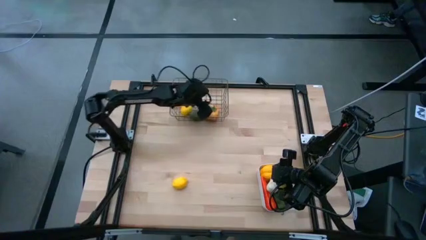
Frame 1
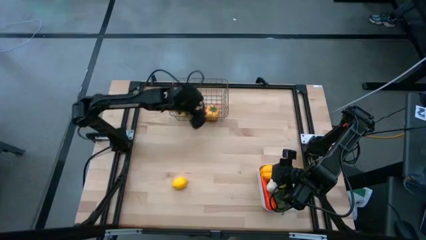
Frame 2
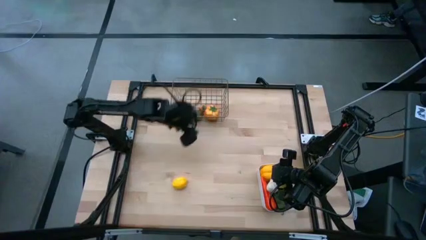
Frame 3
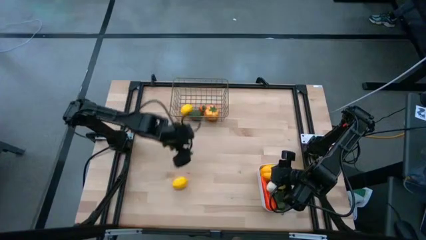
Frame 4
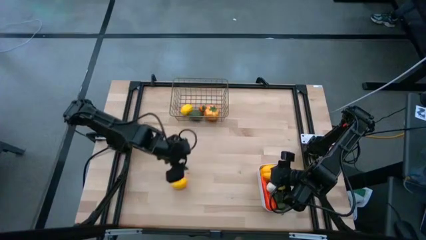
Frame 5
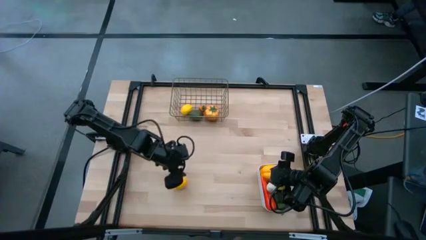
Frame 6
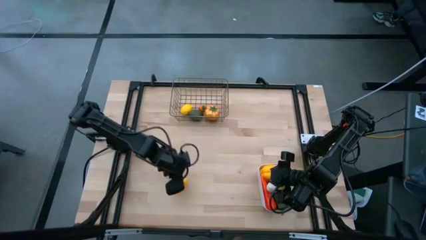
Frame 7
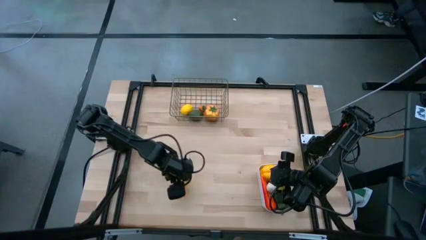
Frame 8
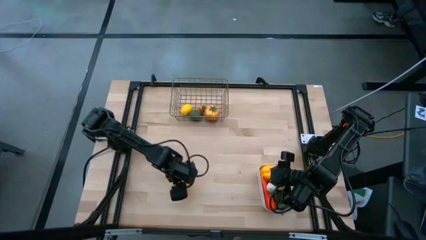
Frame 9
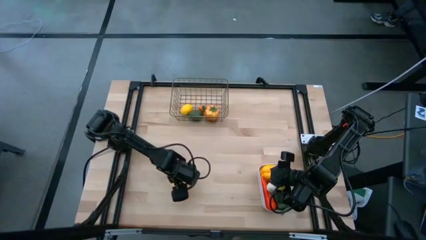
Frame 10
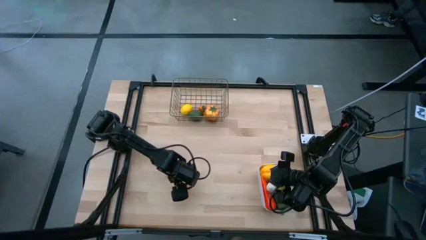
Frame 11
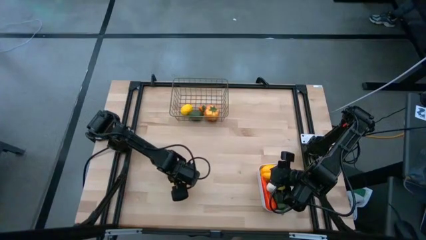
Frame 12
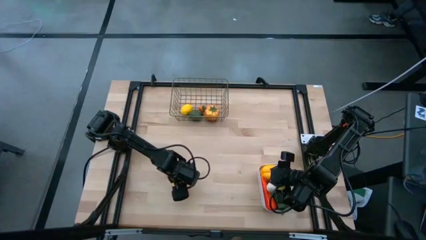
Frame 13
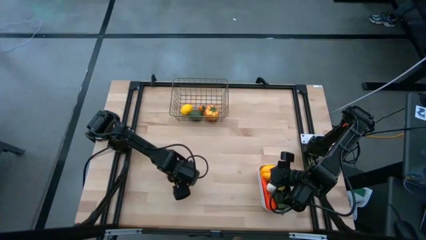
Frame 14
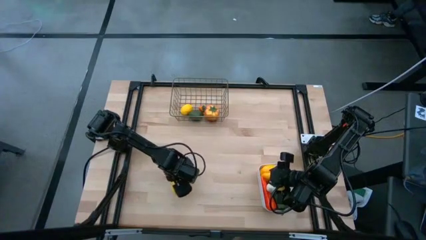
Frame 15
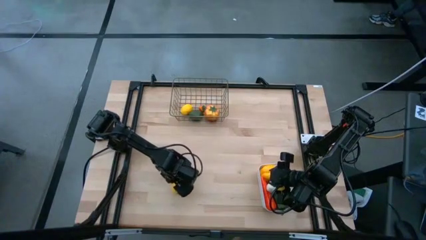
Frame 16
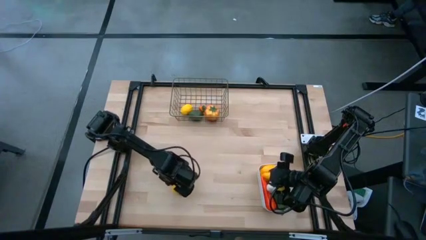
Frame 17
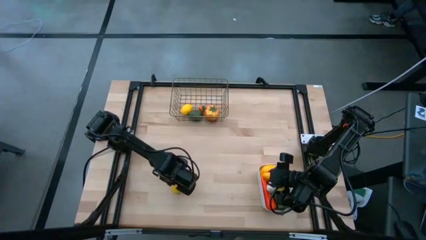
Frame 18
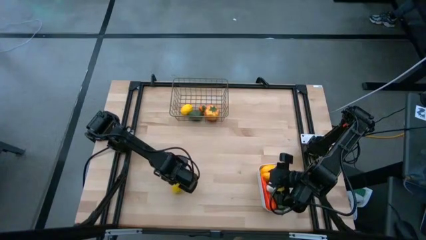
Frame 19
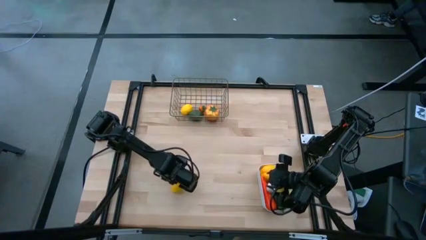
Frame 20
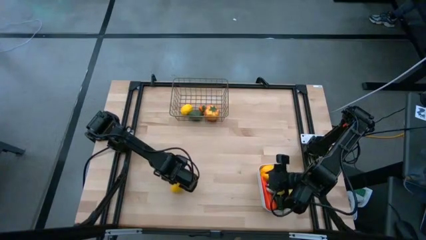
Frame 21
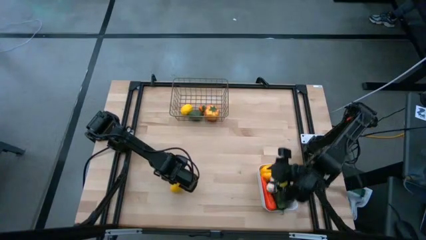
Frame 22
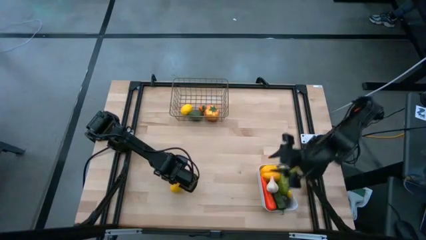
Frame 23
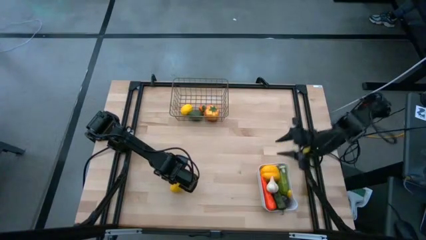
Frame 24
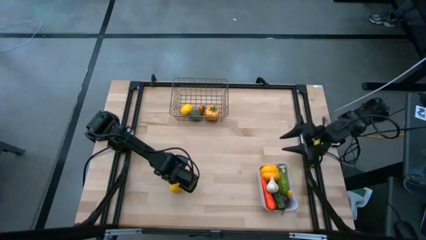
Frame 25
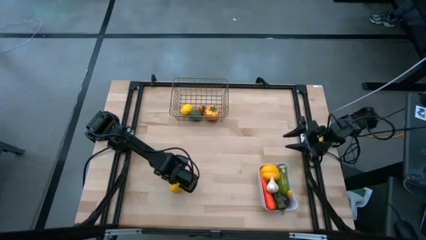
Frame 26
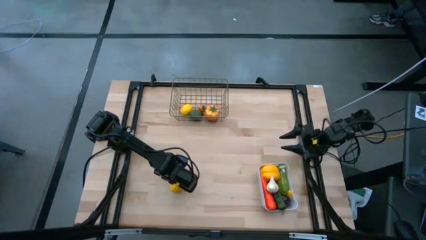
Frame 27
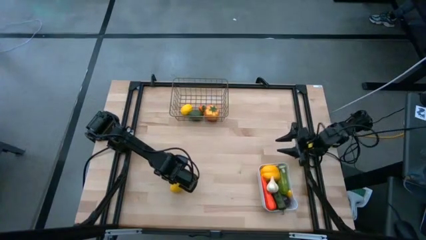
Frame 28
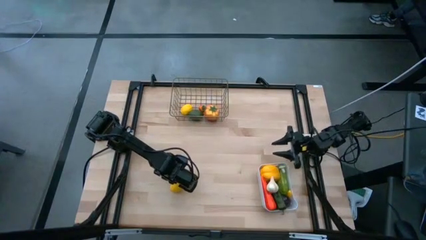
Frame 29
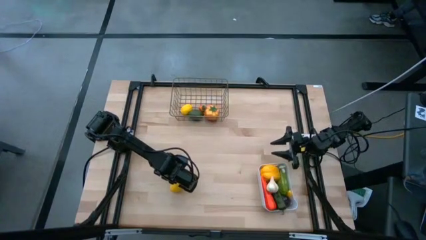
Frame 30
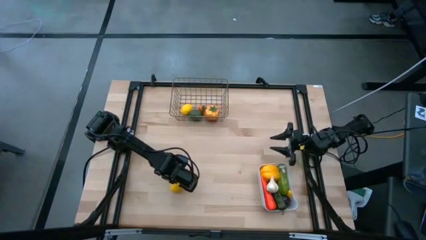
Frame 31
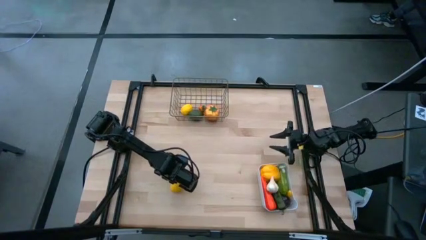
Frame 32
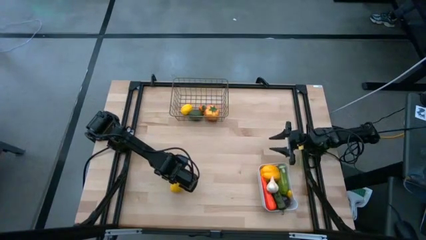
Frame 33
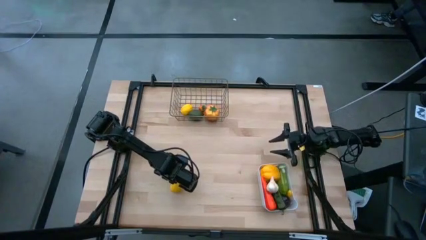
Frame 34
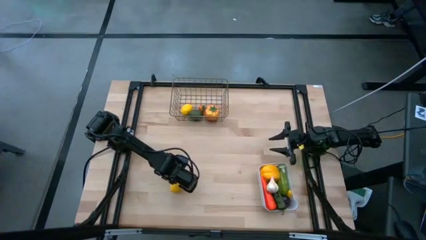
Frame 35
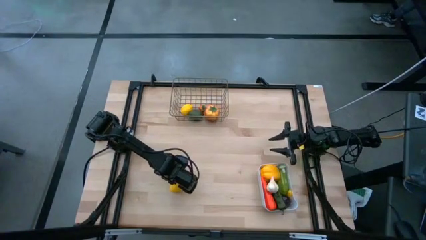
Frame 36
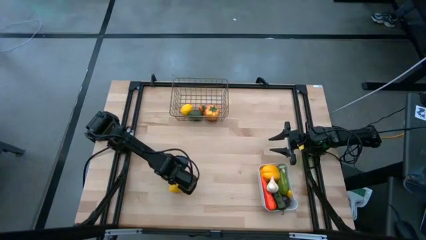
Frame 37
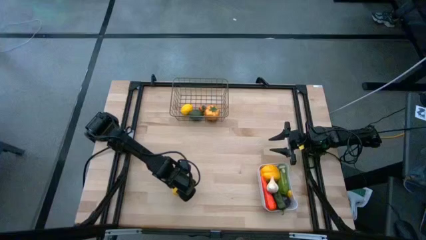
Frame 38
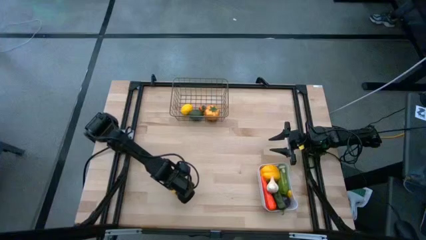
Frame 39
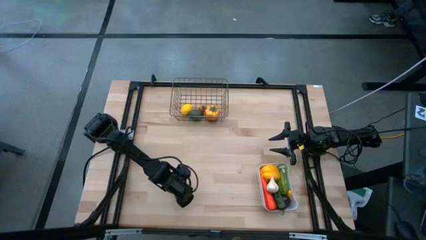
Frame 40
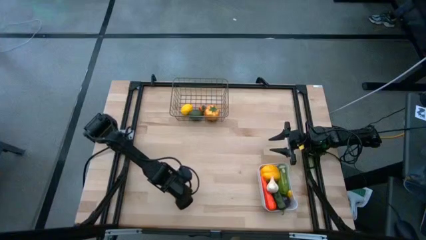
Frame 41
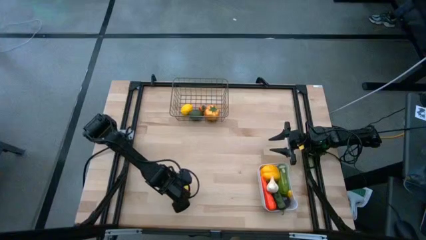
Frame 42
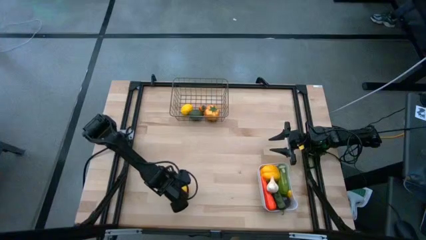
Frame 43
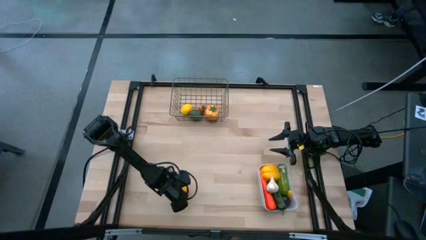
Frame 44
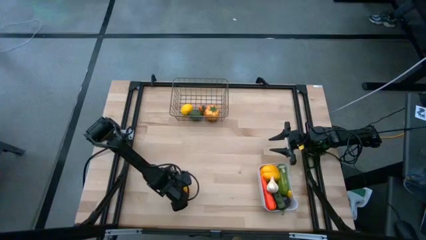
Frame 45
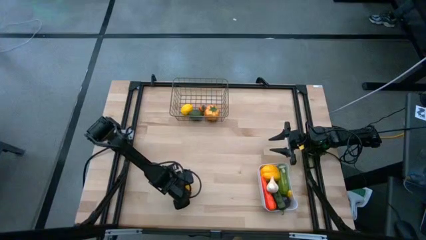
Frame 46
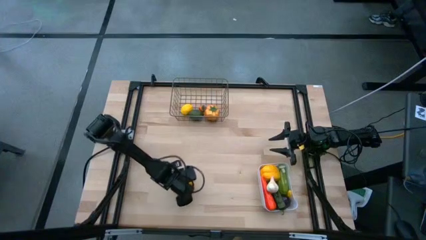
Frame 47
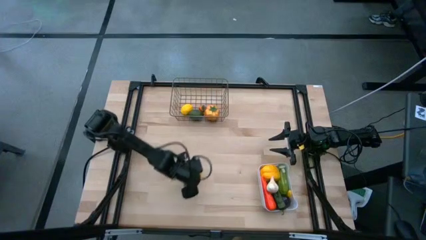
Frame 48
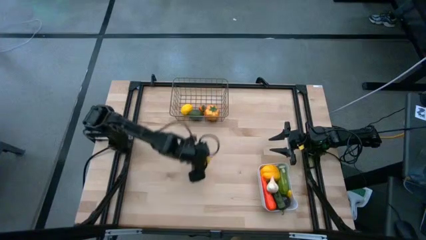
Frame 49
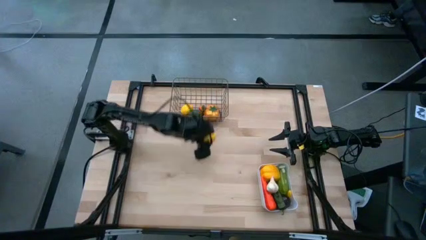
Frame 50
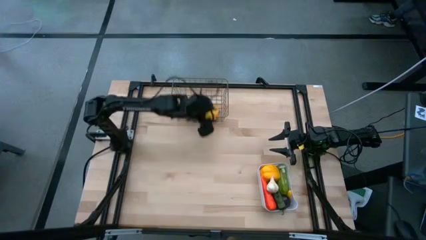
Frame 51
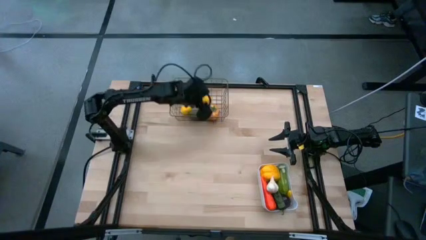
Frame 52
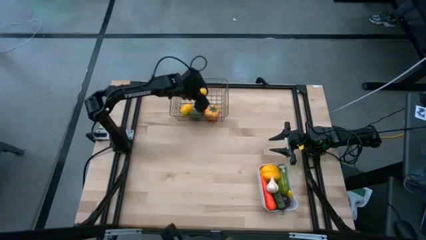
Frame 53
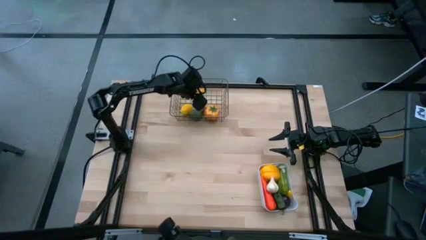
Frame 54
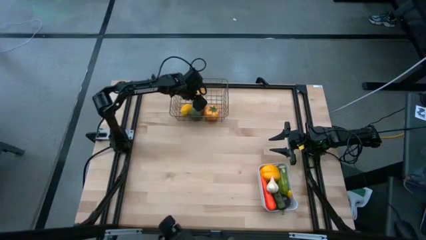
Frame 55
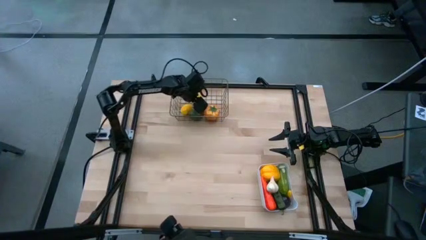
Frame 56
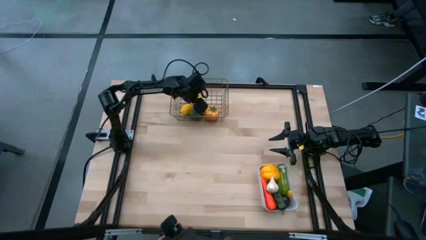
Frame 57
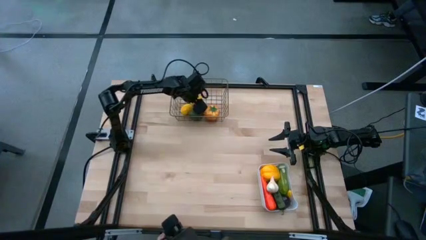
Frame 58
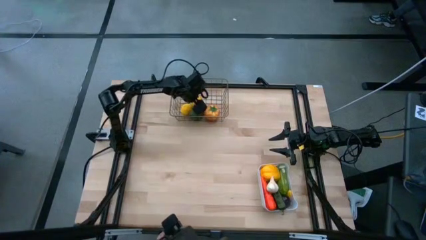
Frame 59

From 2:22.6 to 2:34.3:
Task: Sort produce into baskets
Put the lemon into the mesh basket

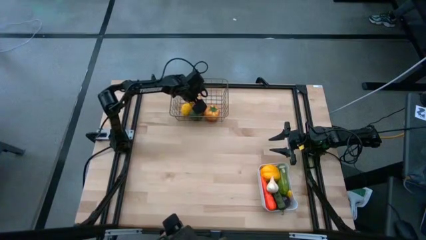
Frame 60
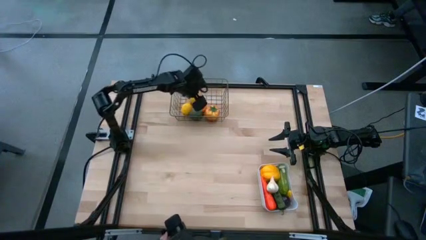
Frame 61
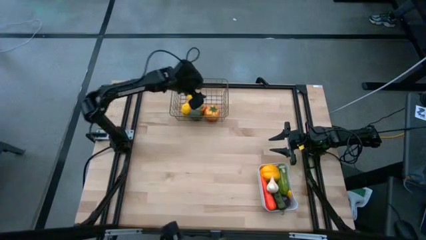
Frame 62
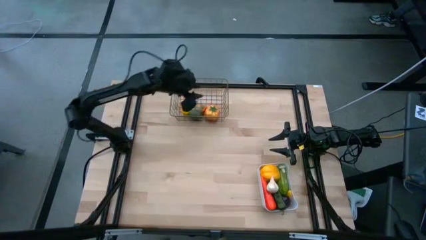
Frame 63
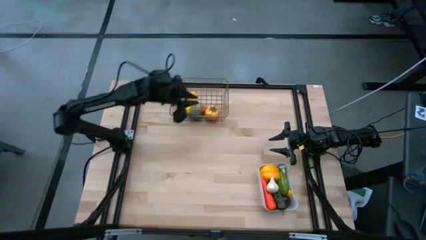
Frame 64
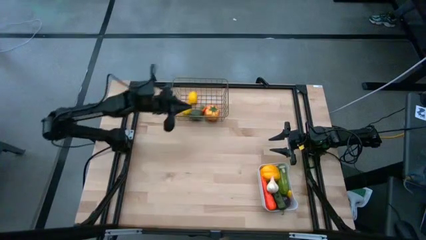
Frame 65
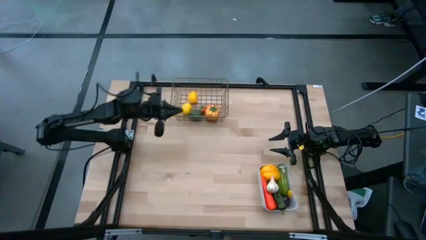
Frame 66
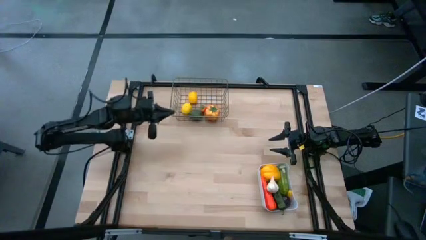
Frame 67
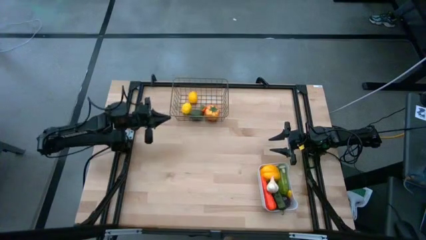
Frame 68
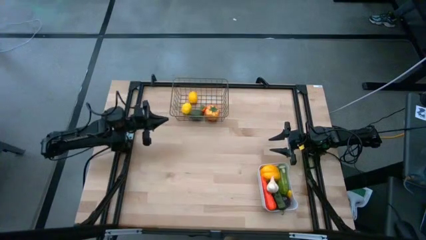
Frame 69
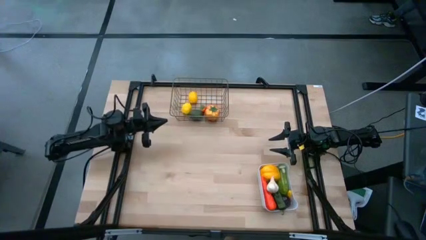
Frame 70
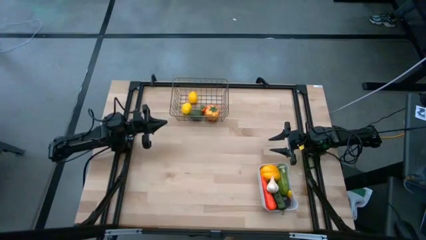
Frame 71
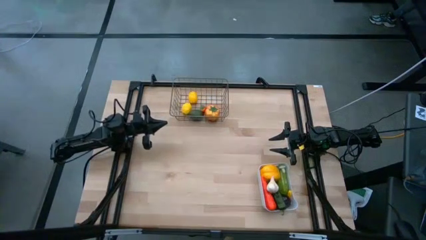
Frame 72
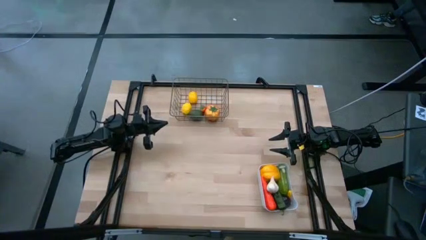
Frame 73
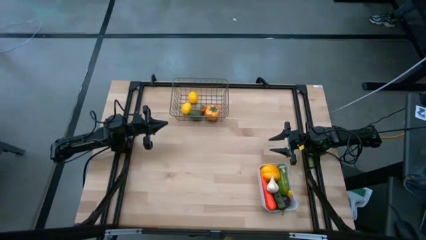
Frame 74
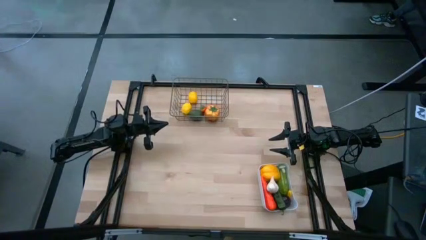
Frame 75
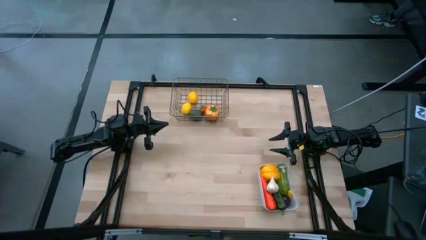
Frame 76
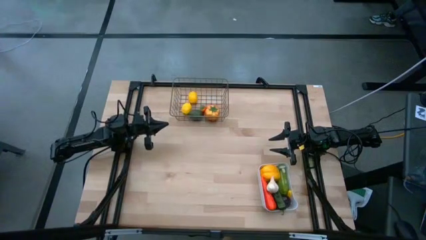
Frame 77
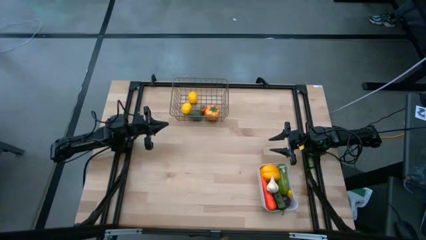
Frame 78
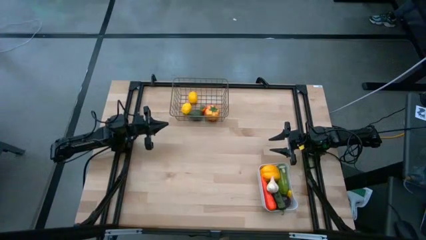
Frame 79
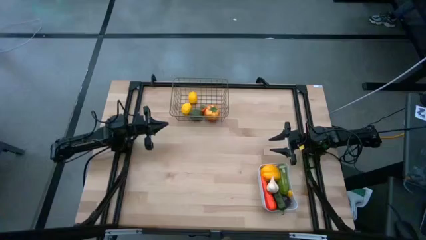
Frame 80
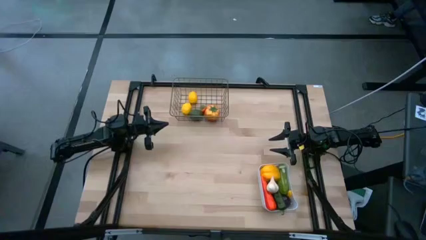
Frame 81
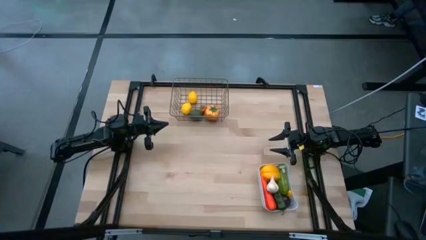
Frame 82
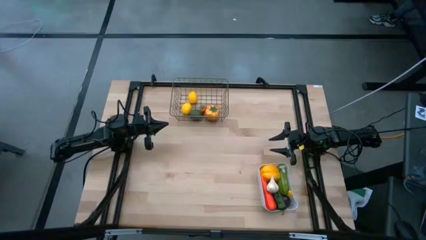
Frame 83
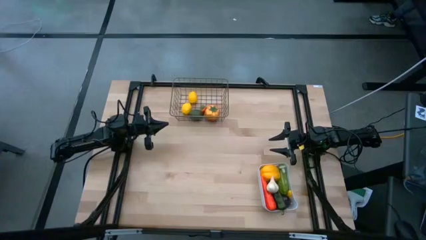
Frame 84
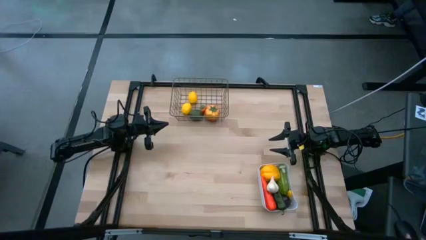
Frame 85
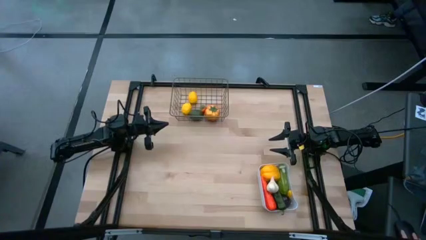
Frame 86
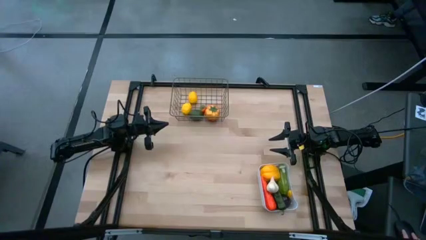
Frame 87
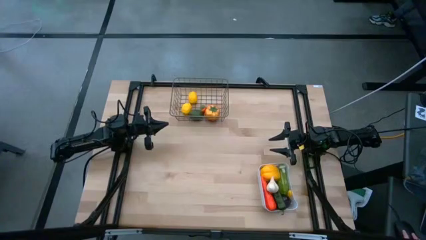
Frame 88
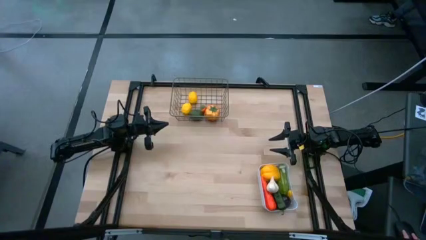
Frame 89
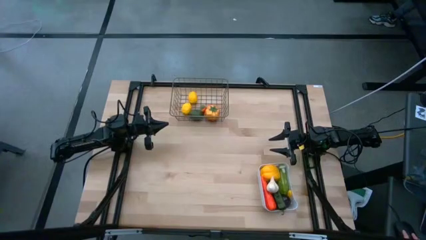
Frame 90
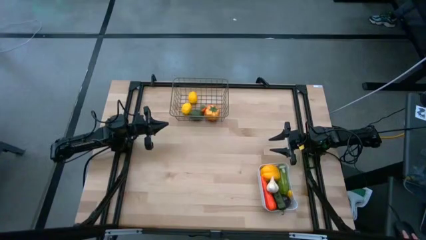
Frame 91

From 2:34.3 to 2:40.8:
Return to Home position
